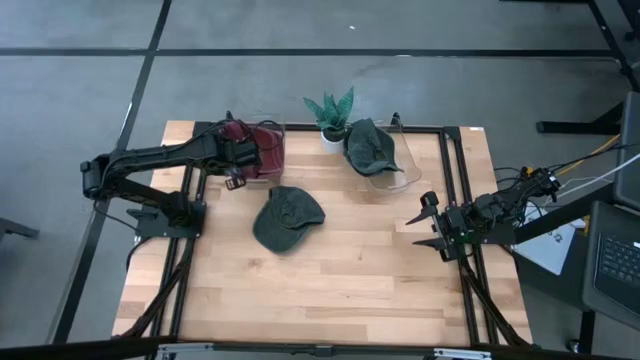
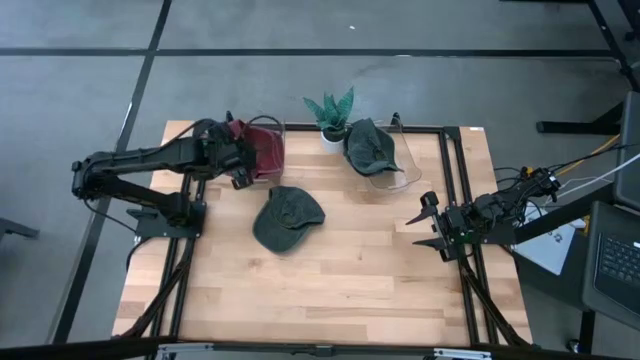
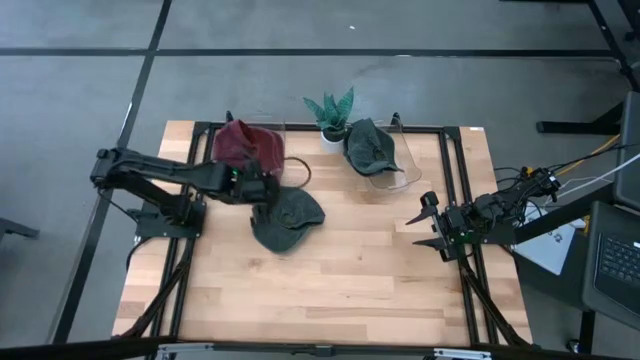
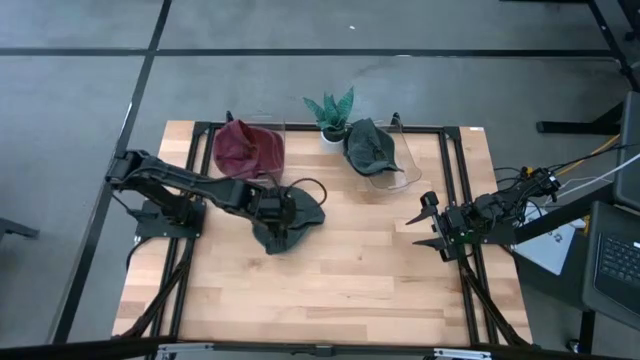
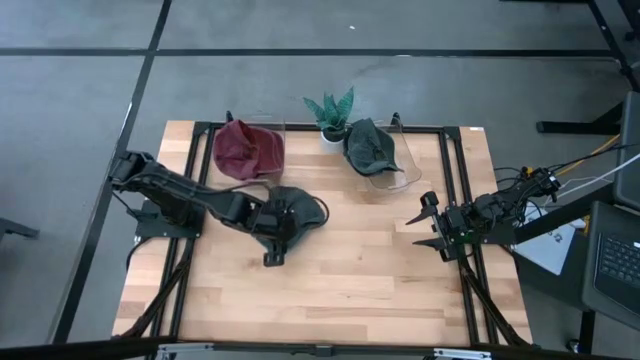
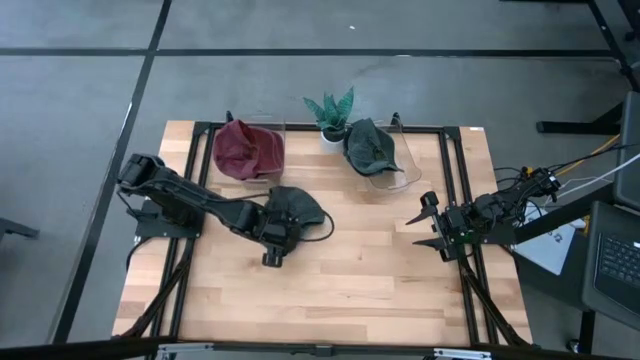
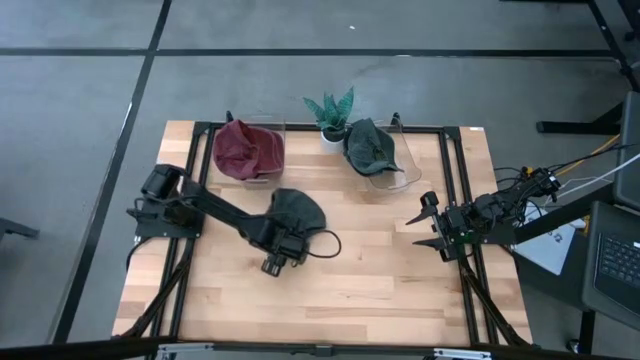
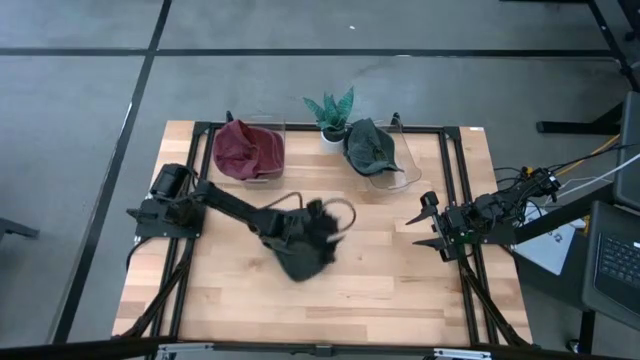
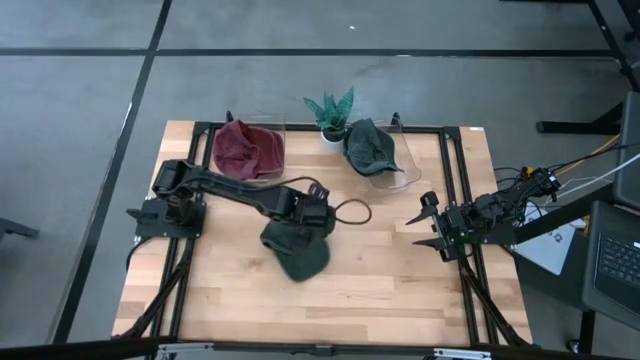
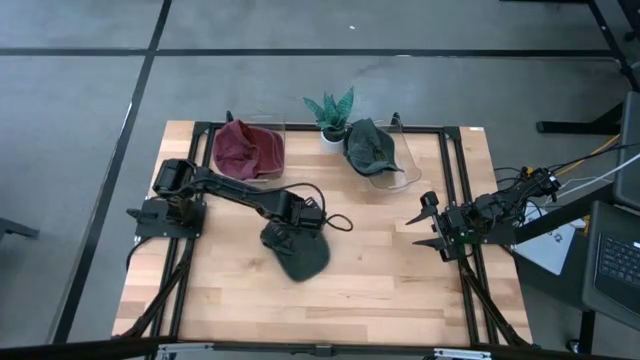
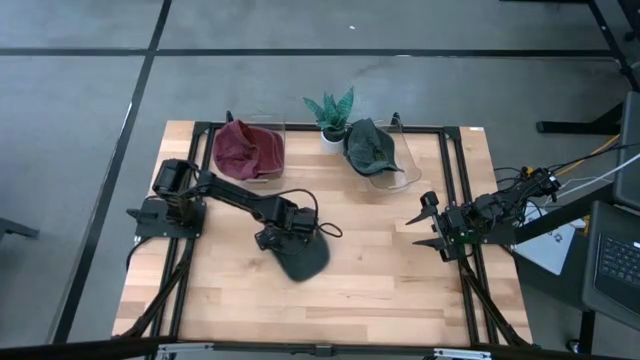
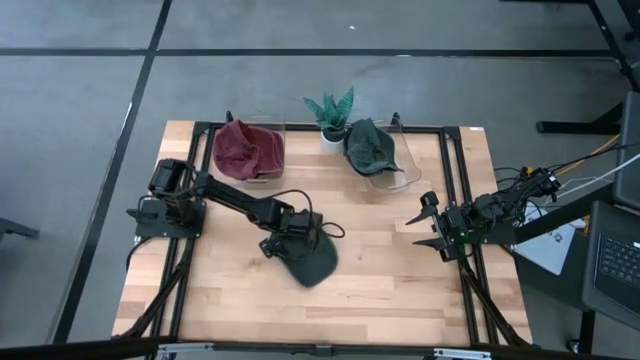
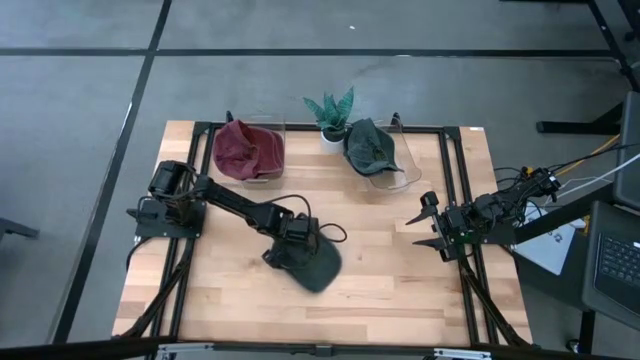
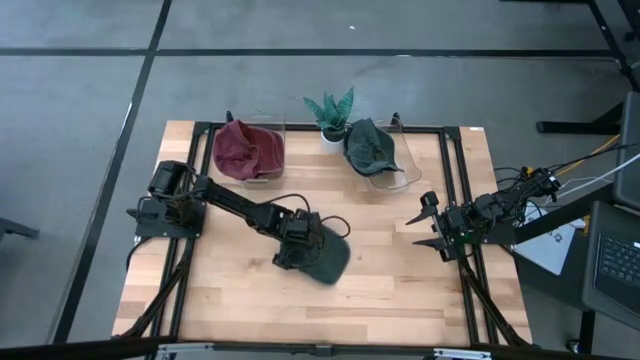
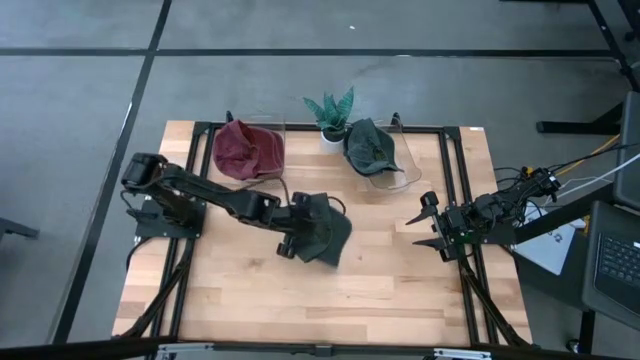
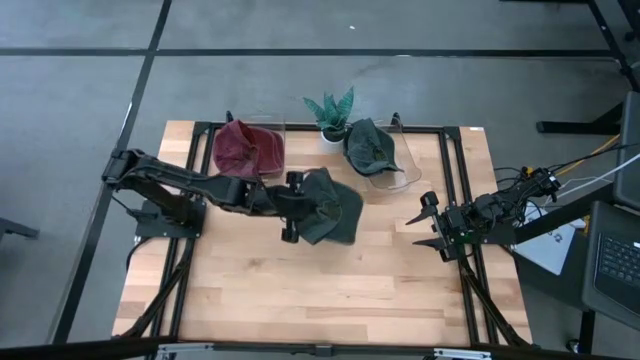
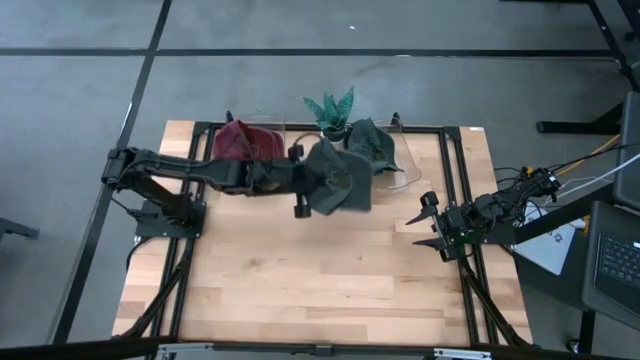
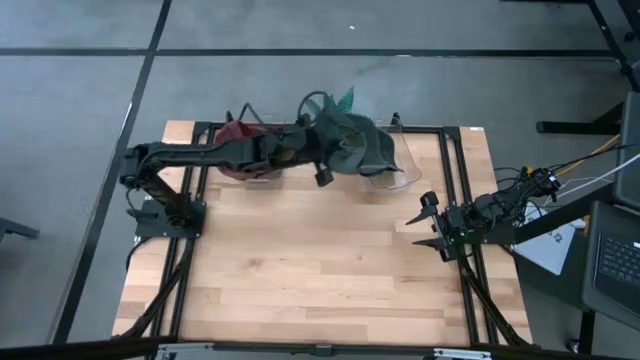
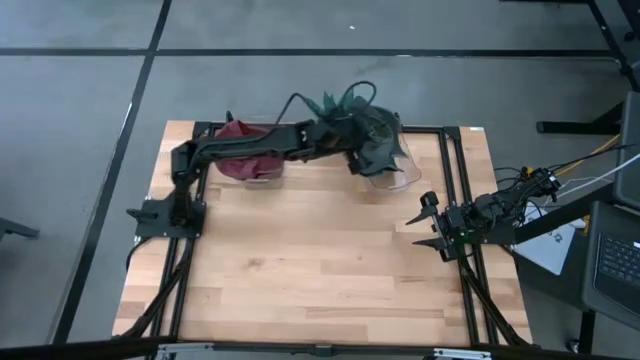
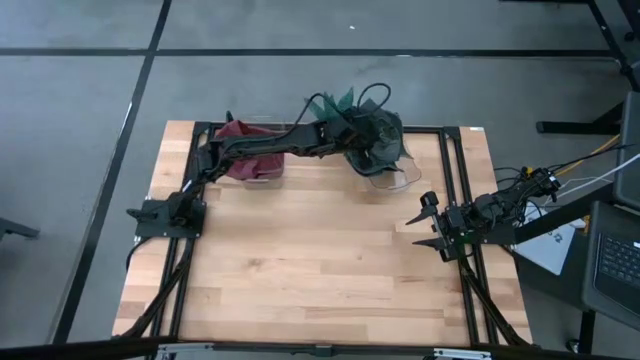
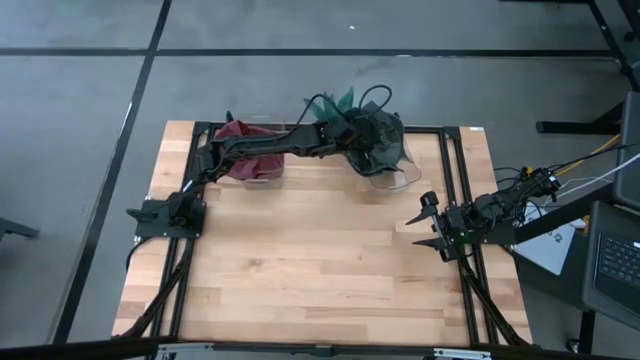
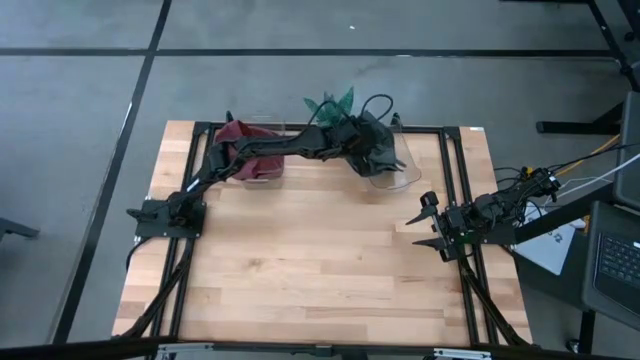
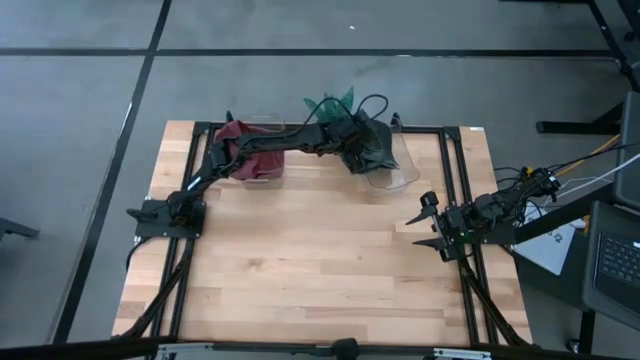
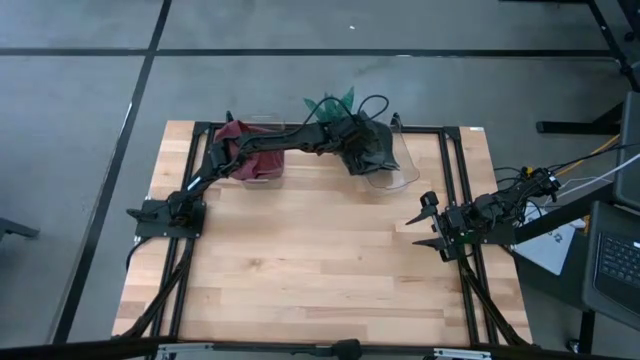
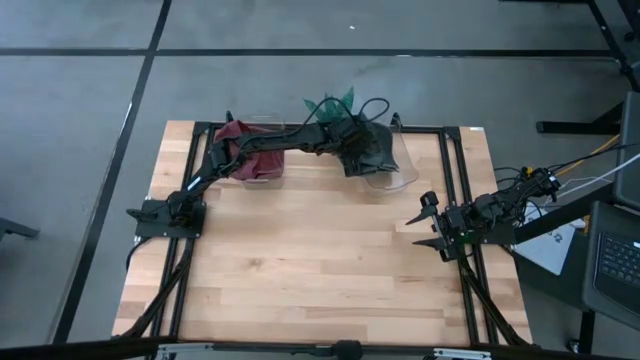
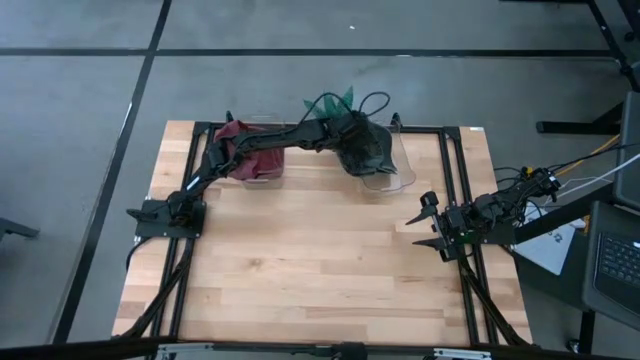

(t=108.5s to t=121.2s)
Task: Pick & Place hat
Put the gray cap into the right bin

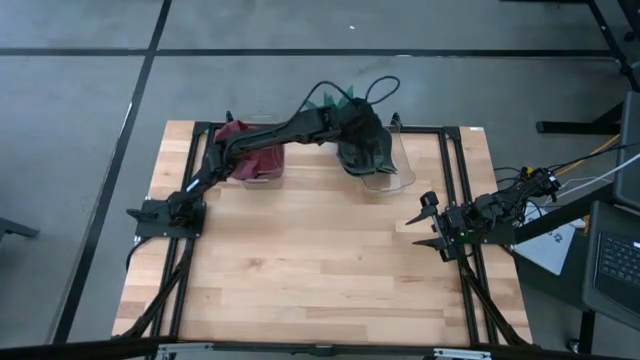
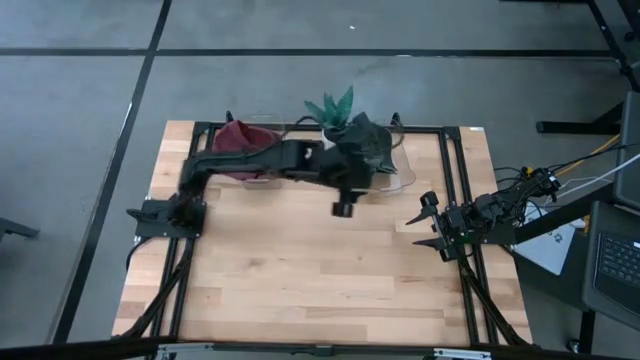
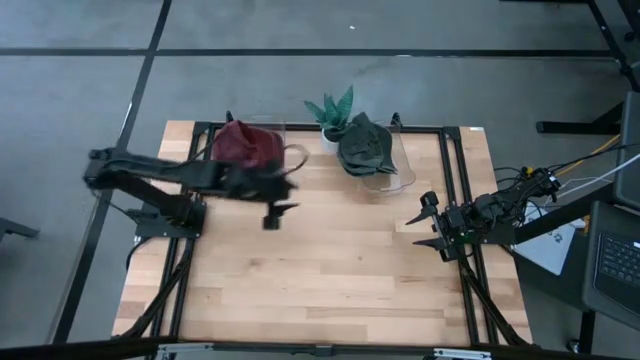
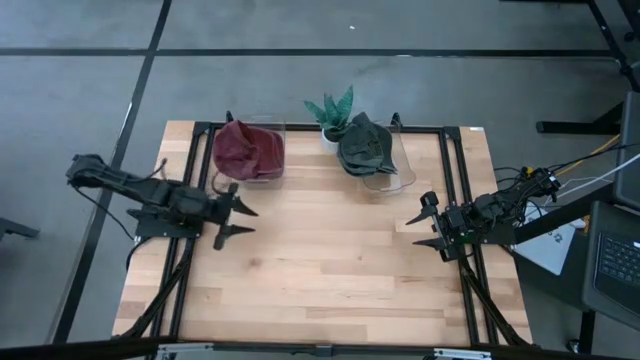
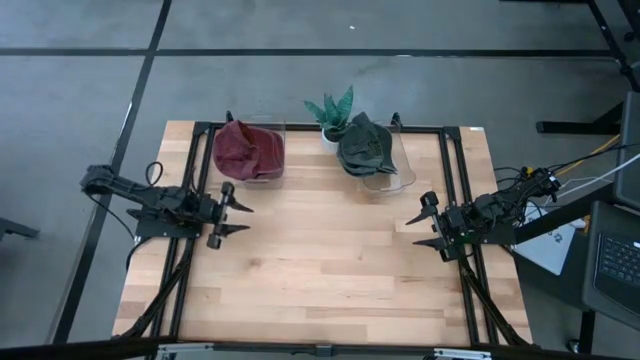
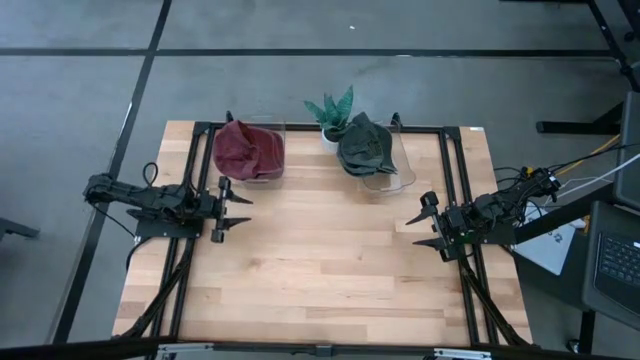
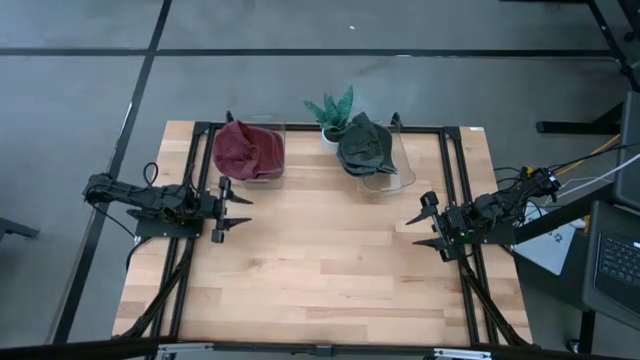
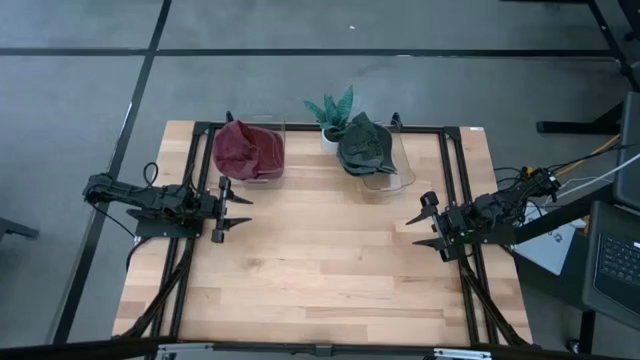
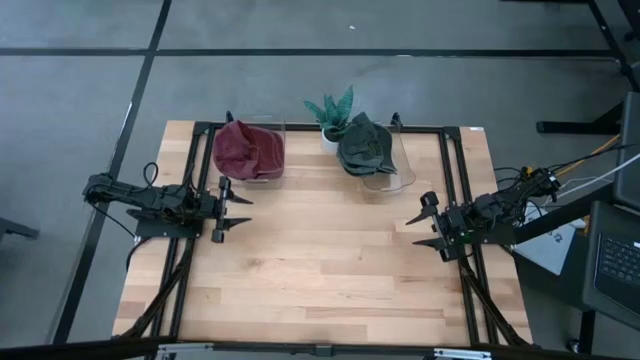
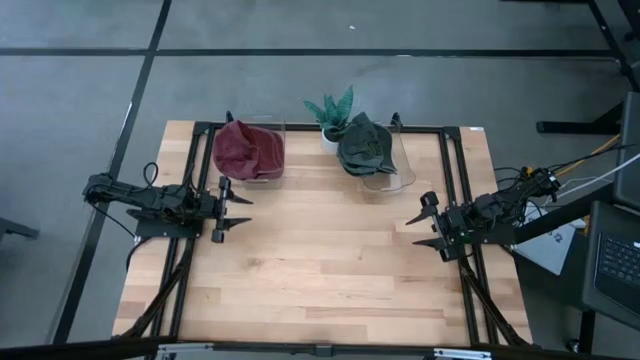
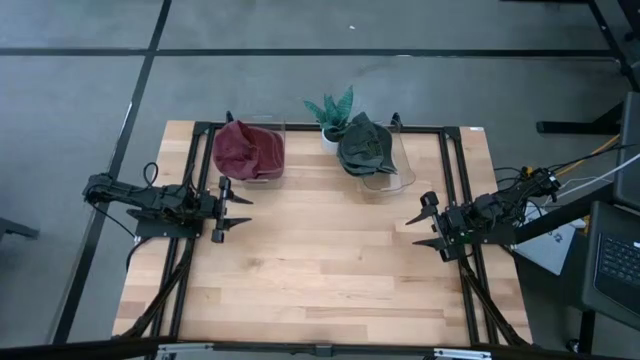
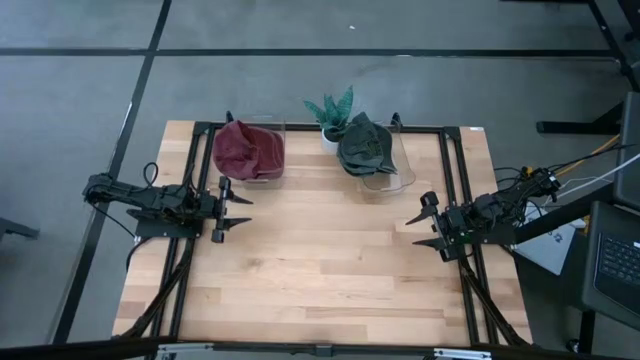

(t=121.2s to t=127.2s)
Return to Home Position
